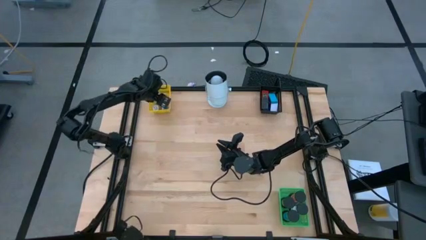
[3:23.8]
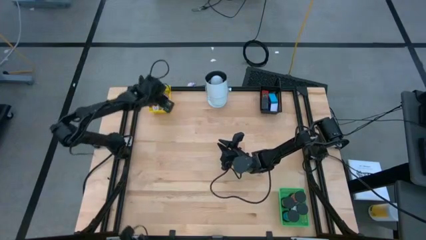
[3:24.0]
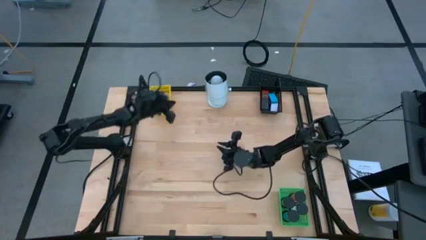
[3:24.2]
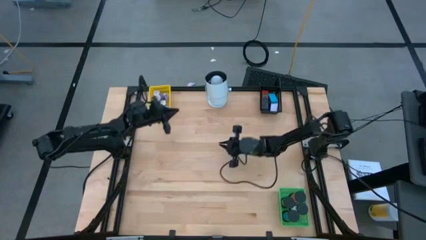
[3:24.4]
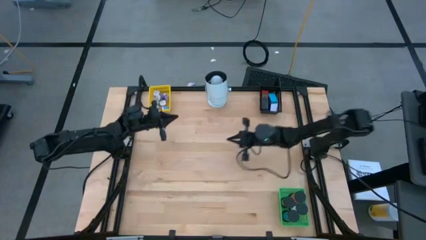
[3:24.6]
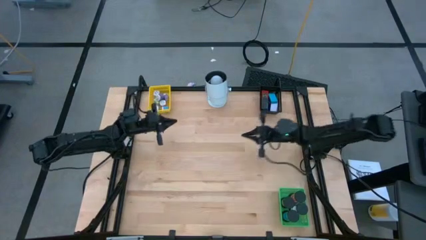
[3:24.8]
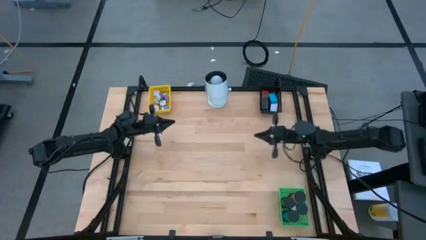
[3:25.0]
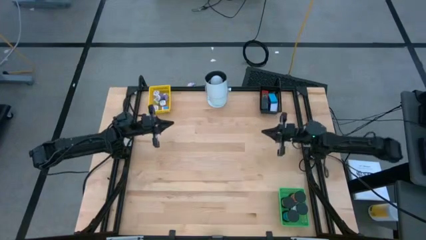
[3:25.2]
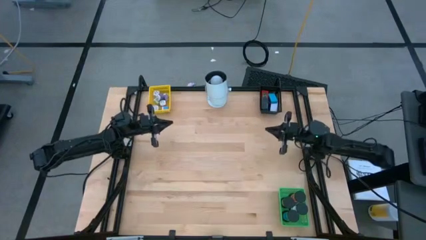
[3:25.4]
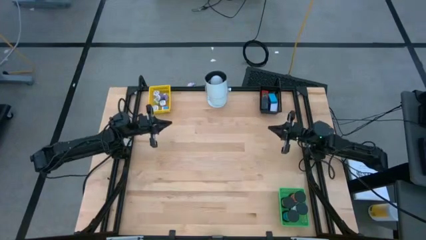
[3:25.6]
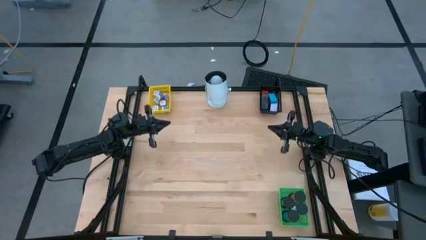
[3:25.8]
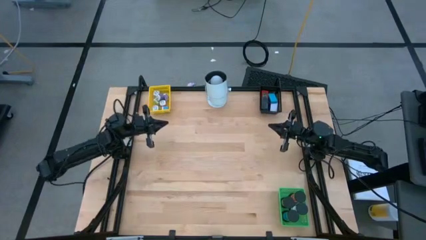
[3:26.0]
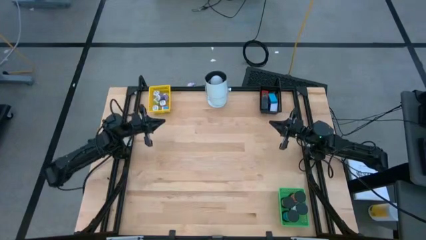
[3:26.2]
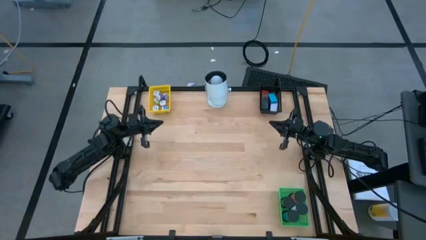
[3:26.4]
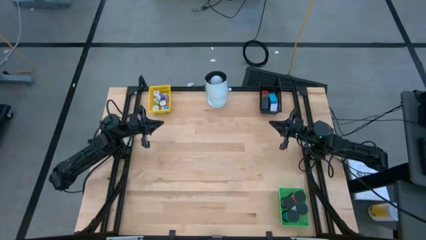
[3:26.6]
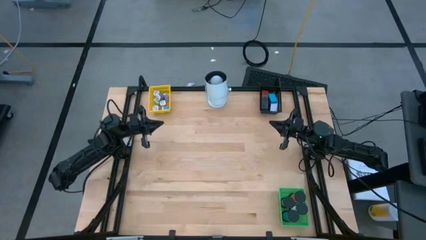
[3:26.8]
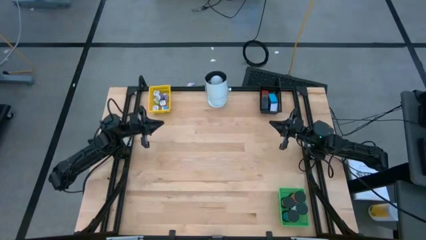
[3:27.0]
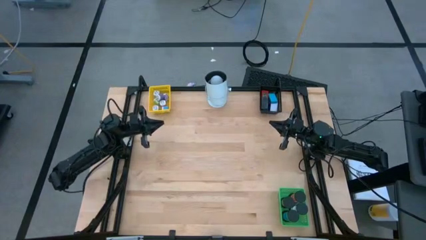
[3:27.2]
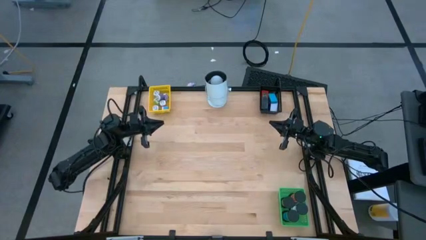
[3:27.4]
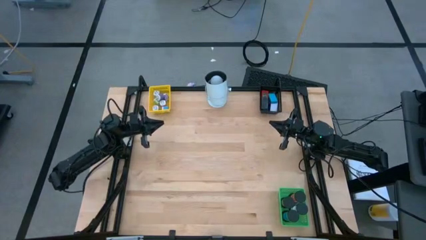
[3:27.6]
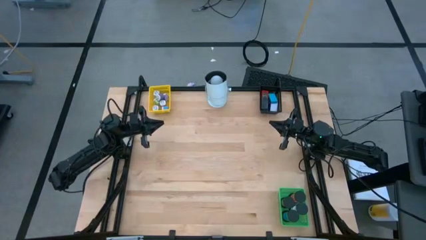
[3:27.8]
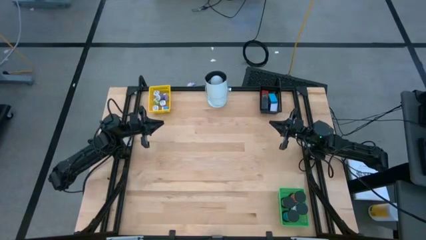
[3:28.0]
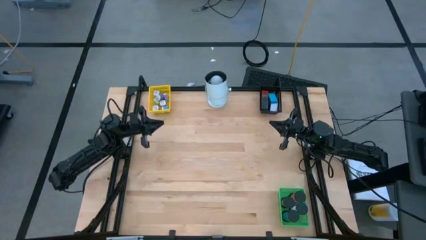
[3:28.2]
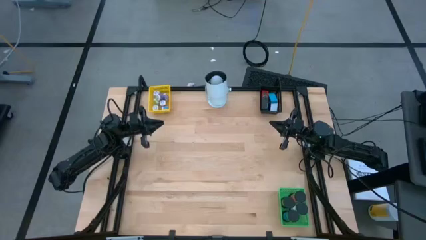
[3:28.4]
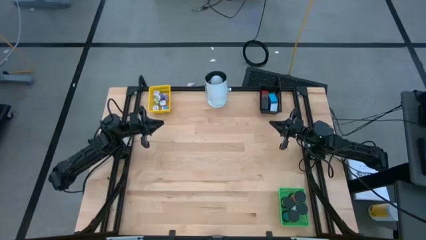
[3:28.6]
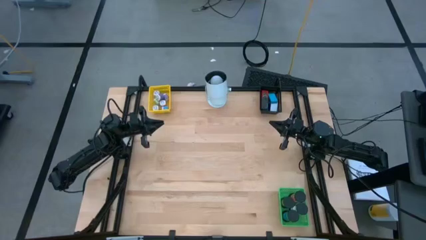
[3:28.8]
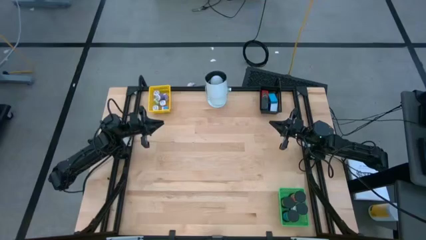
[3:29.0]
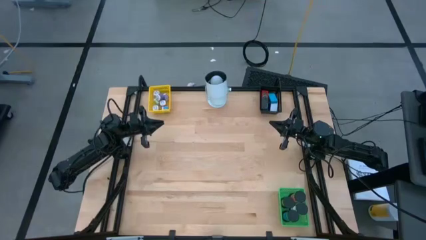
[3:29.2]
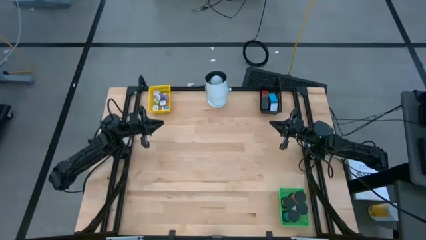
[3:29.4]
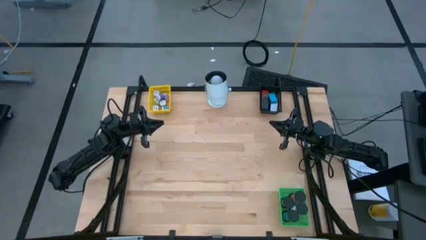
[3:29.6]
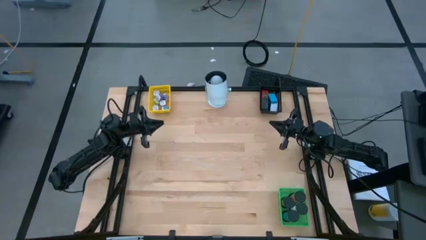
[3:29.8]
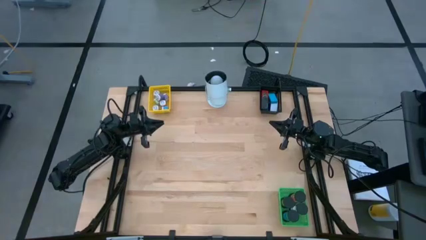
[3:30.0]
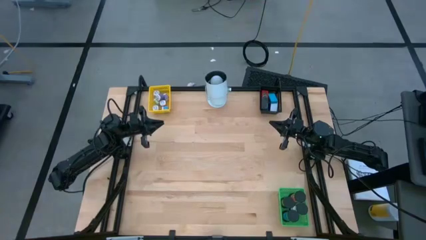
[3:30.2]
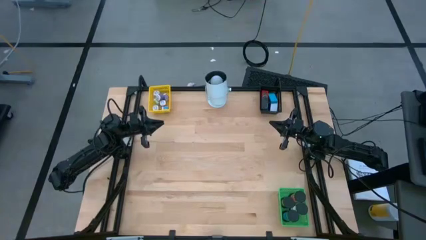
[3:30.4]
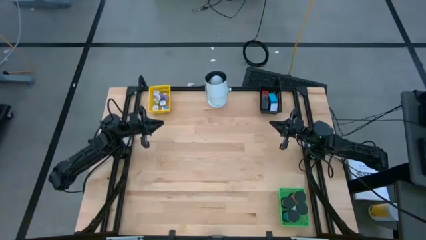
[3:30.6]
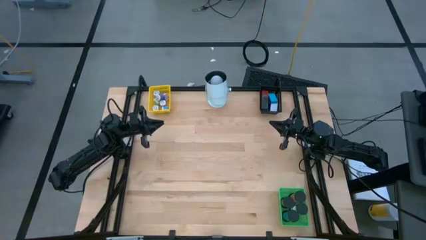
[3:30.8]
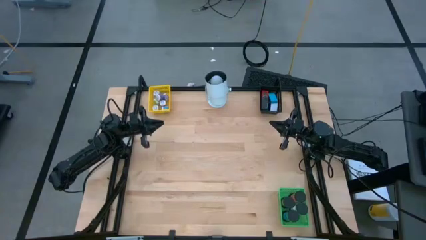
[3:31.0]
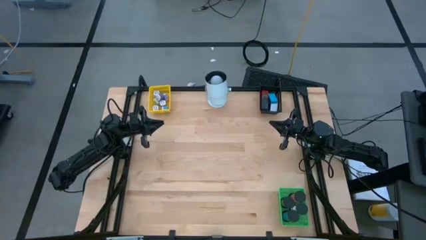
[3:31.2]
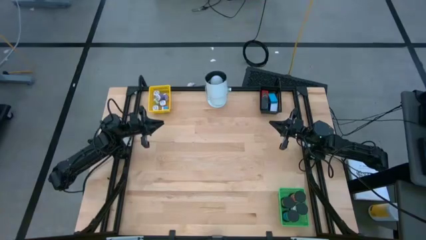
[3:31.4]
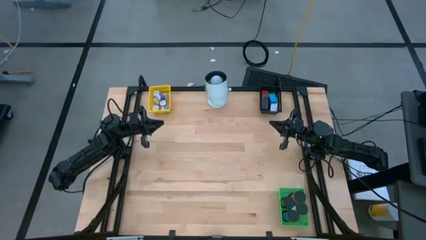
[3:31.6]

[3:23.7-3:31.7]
Task: Pick & Place Office items
Return to Home Position

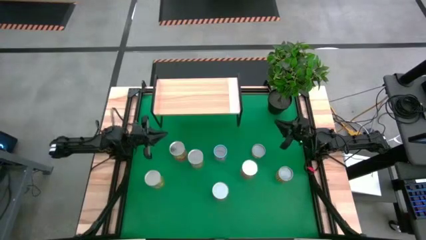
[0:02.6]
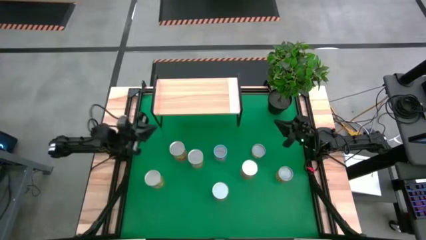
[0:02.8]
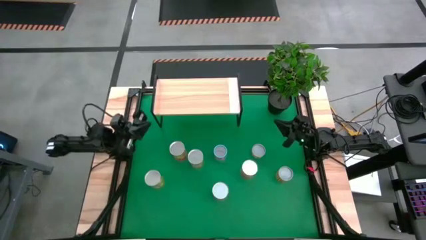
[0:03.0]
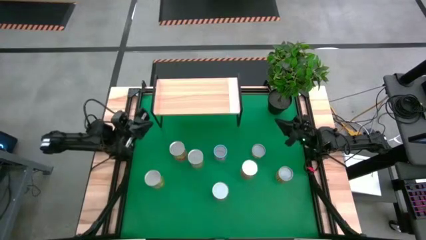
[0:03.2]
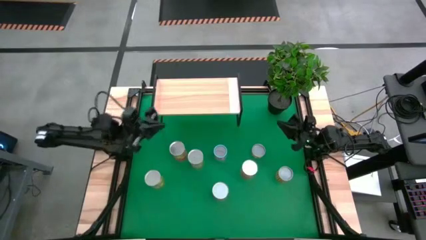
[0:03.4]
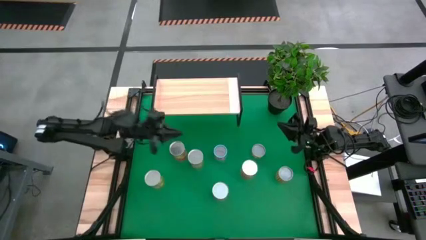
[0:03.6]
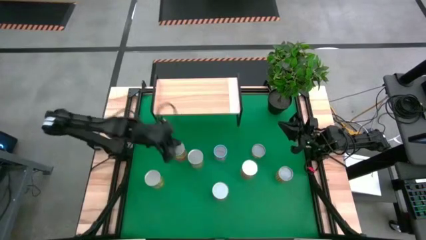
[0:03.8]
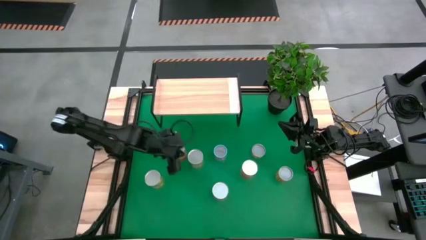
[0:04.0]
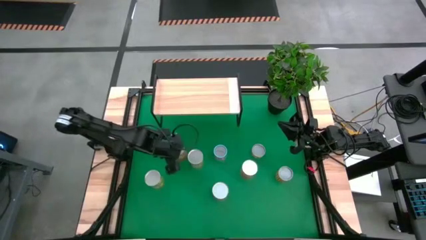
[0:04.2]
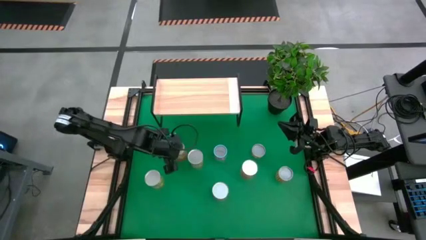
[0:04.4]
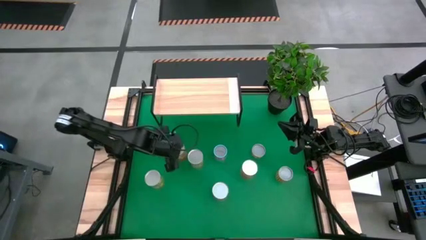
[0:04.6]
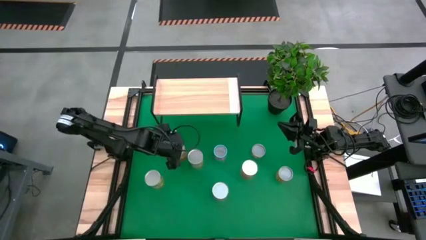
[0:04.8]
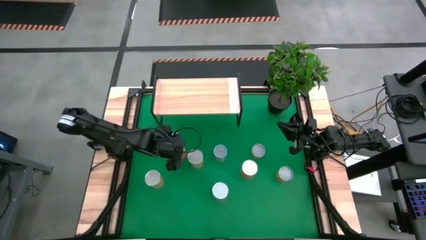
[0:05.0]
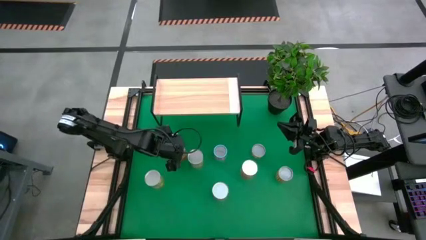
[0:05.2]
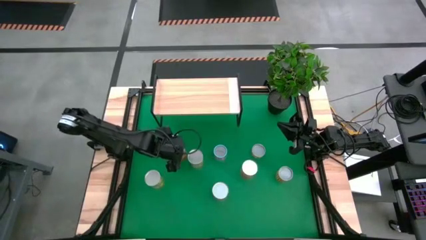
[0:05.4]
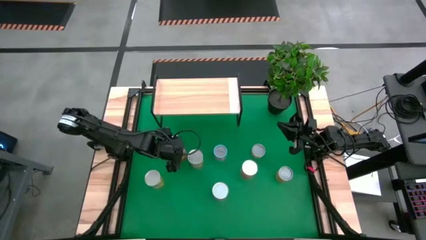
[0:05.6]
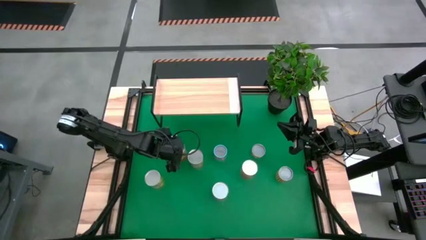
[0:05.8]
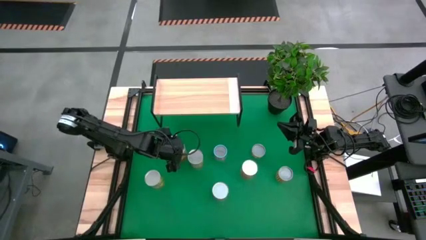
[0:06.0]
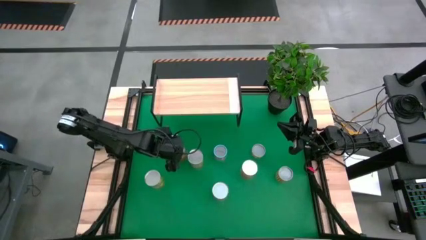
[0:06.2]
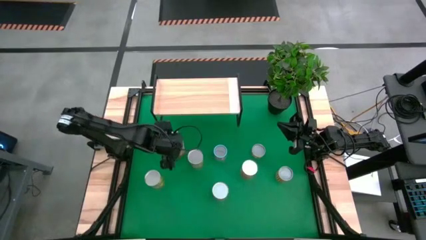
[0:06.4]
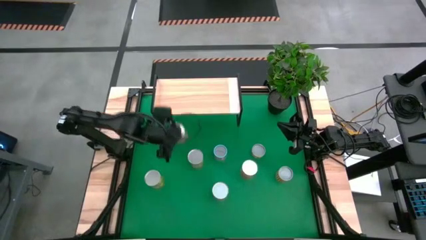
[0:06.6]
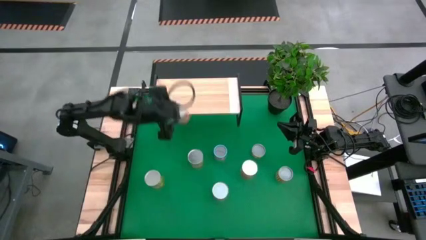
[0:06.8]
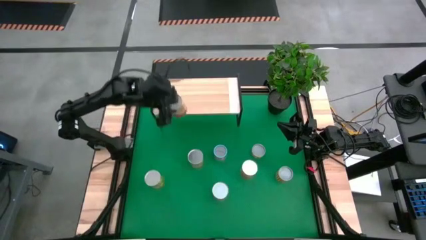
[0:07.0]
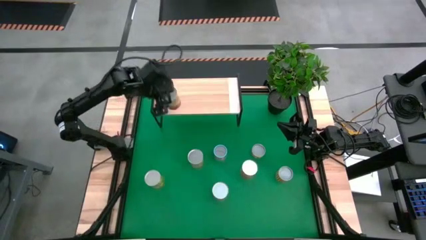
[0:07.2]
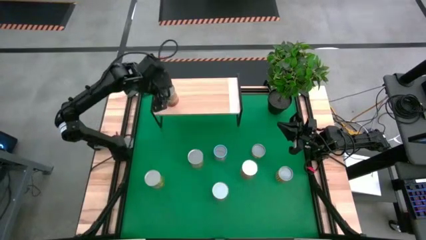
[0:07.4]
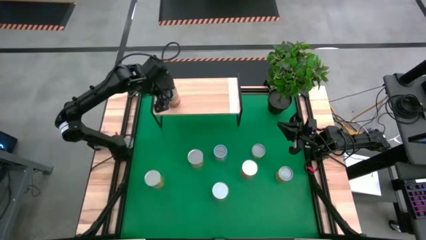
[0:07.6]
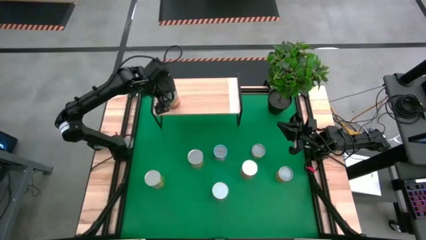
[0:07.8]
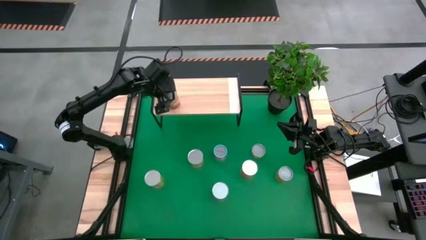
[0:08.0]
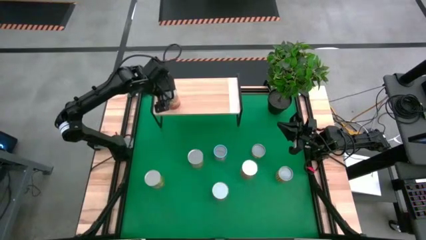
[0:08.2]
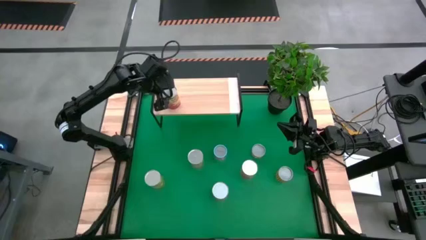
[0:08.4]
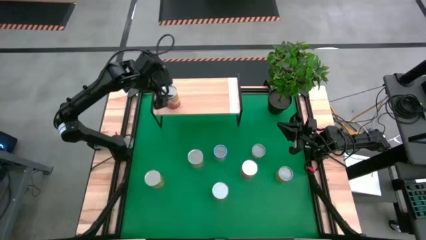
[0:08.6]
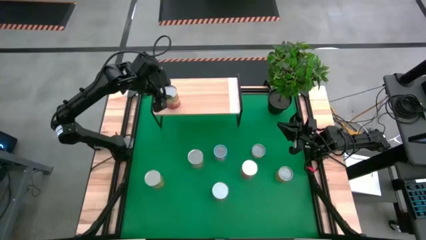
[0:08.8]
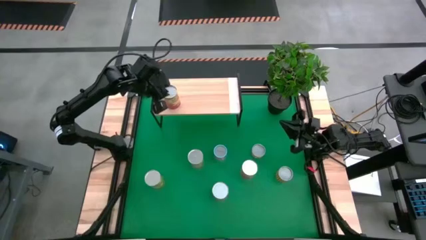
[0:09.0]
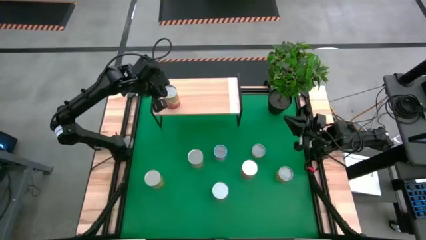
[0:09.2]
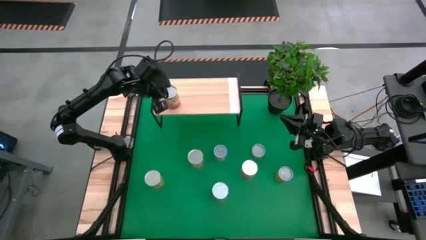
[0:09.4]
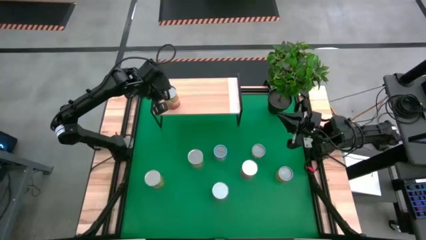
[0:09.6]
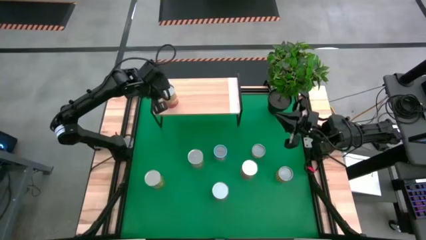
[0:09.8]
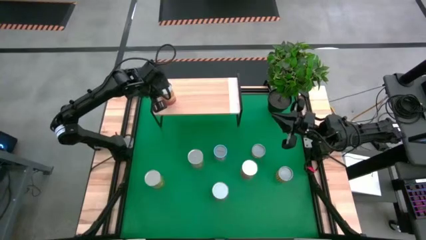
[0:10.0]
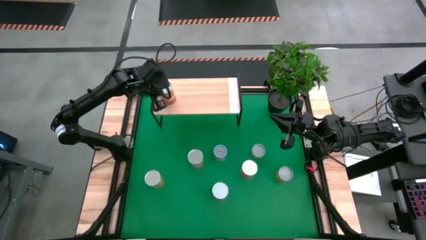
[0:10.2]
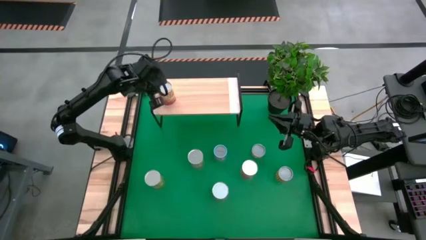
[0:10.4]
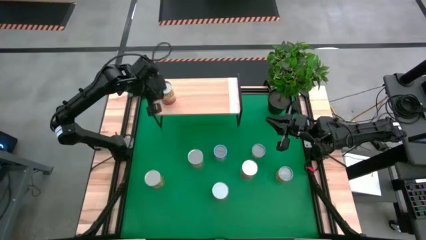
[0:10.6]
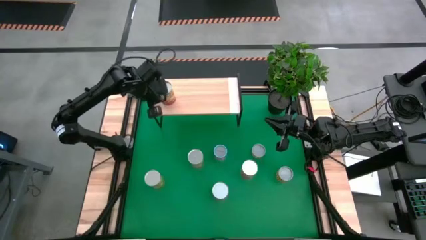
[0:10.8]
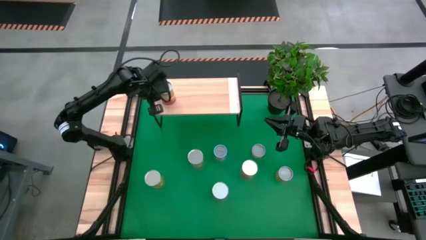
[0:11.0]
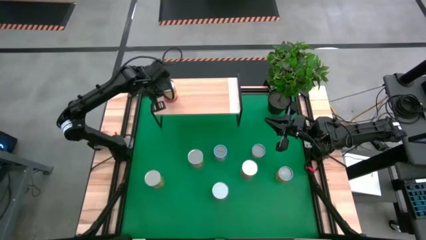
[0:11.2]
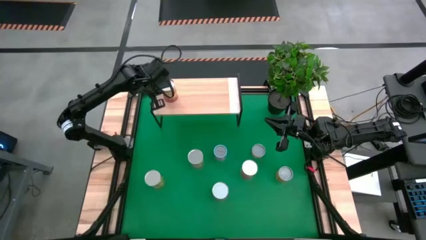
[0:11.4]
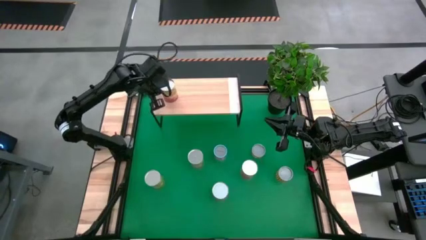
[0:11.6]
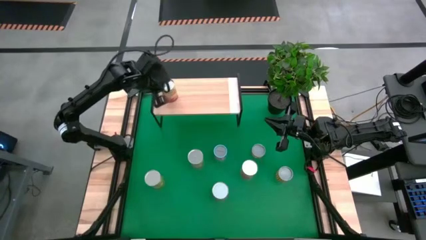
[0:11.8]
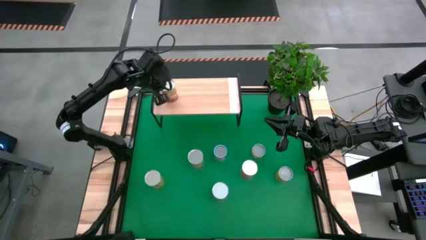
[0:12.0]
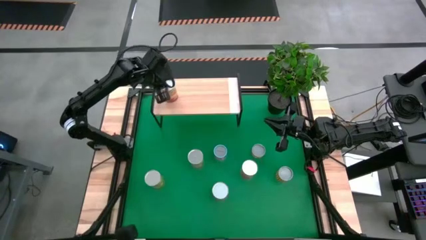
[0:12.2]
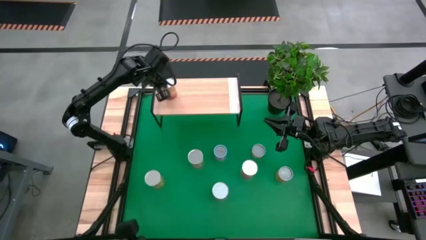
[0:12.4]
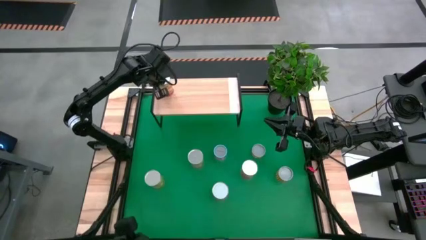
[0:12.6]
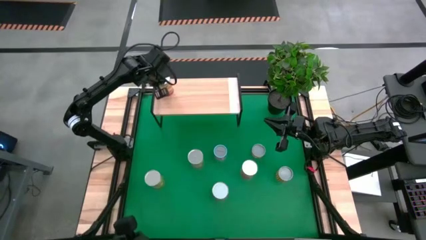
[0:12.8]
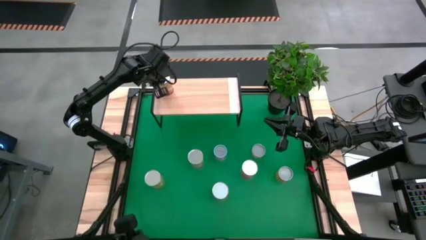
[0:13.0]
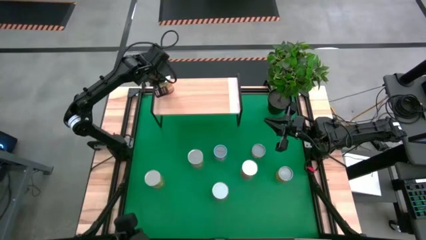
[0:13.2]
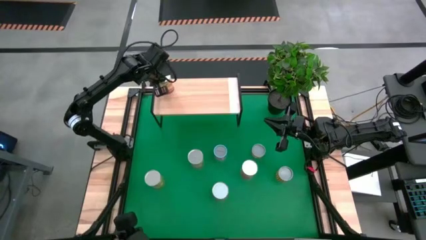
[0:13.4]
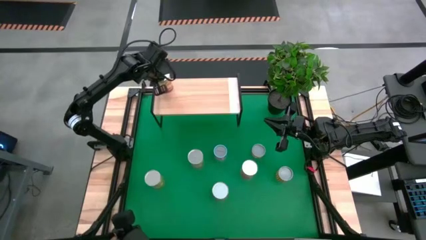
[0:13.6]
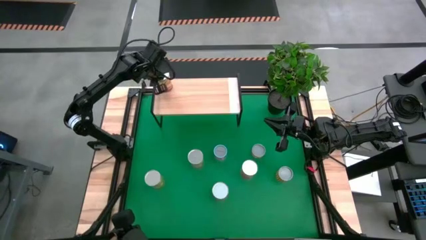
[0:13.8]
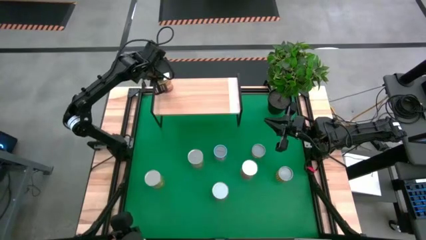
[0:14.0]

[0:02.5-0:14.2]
Task: Pick and place cans onto a shelf
Put the left corn can on the shelf
